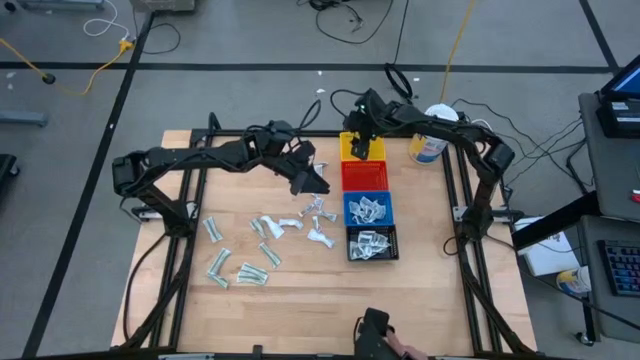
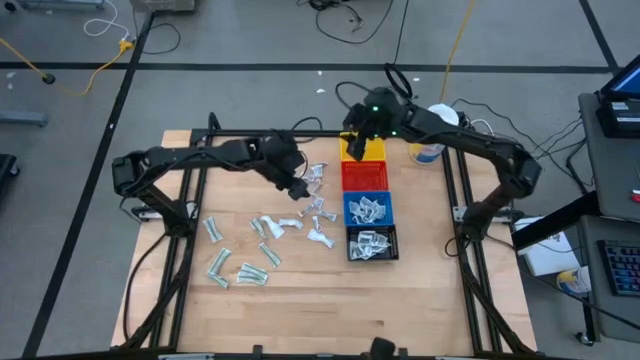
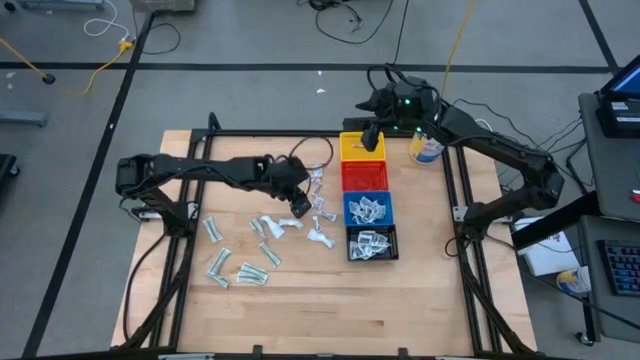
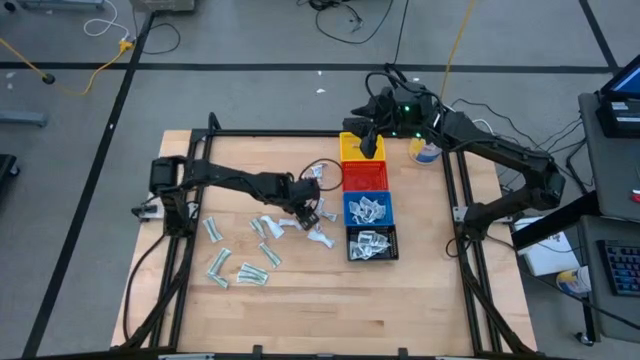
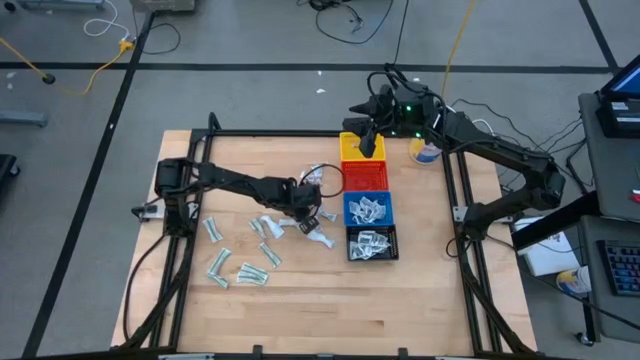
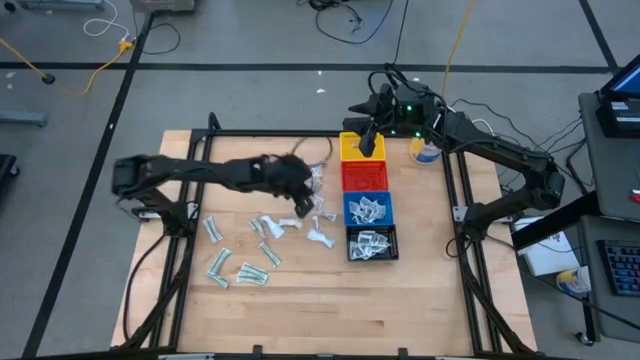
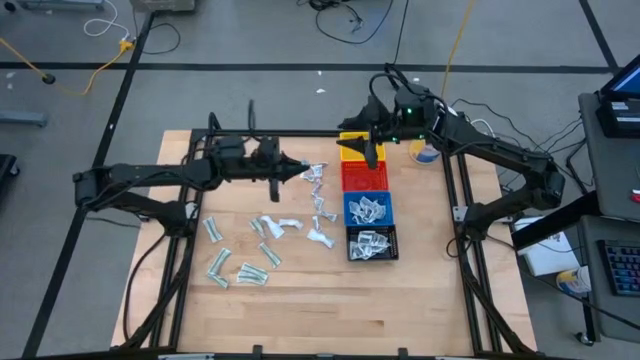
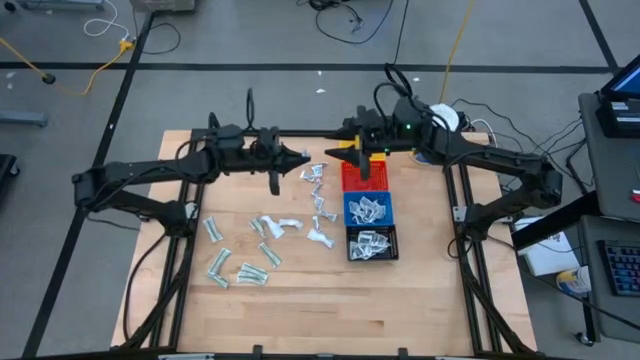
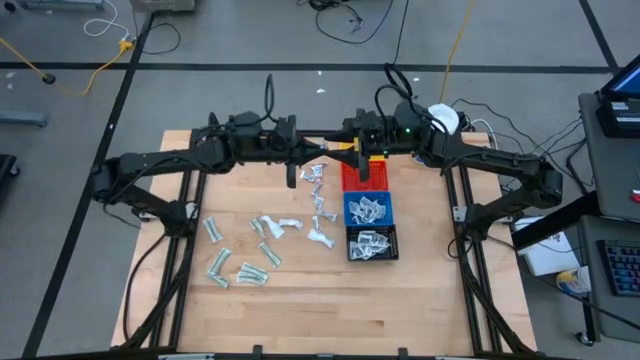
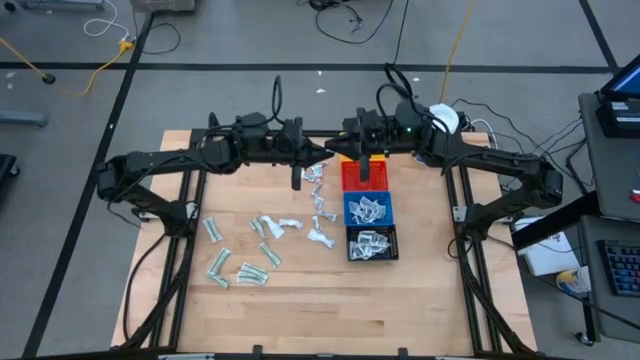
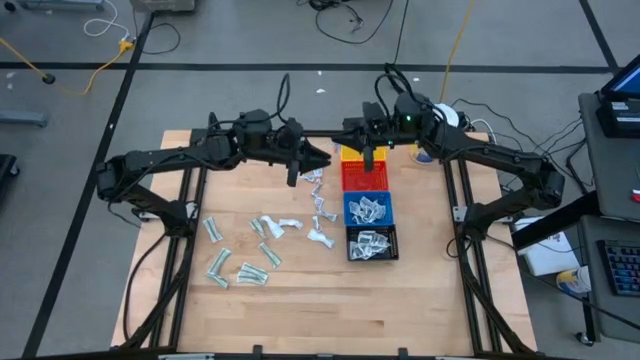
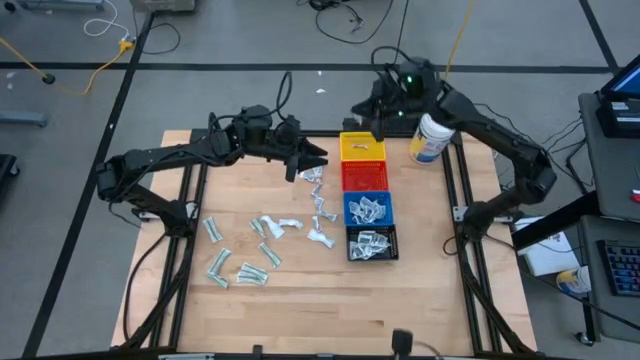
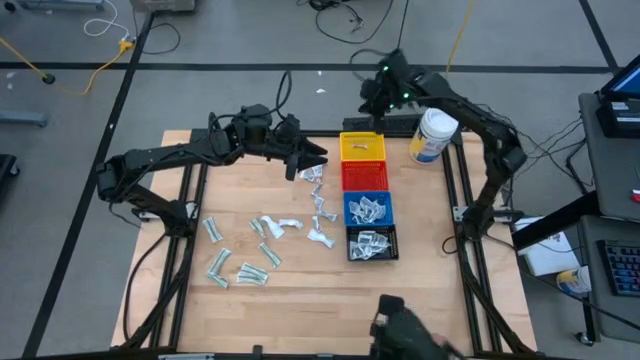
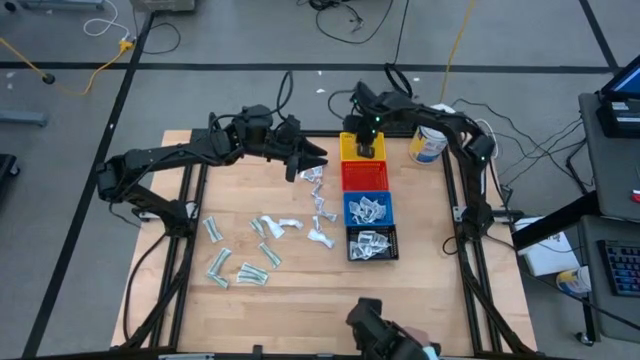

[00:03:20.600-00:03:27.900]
Task: Pick & Place First Aid Supplies
Put the orange ointment pack into the yellow bin

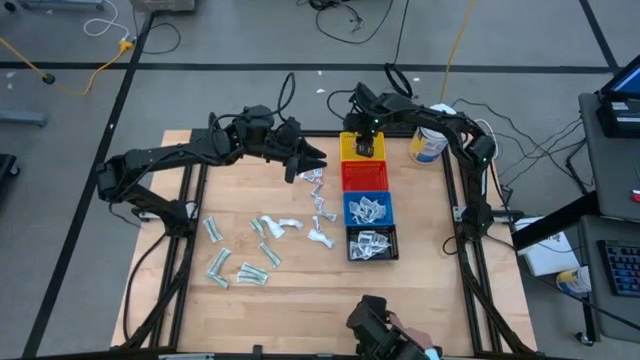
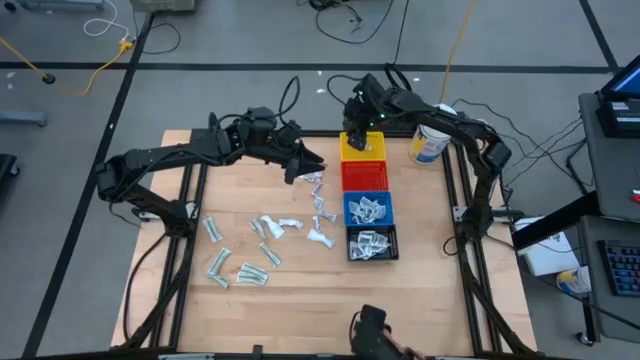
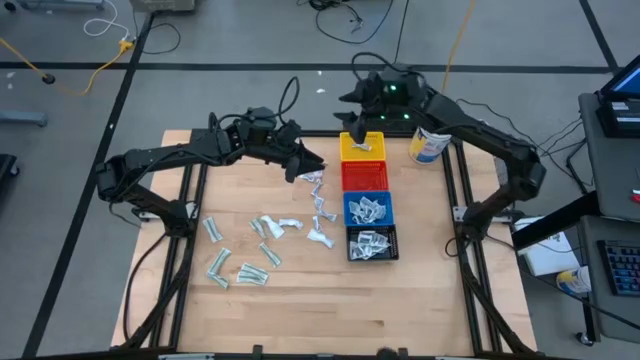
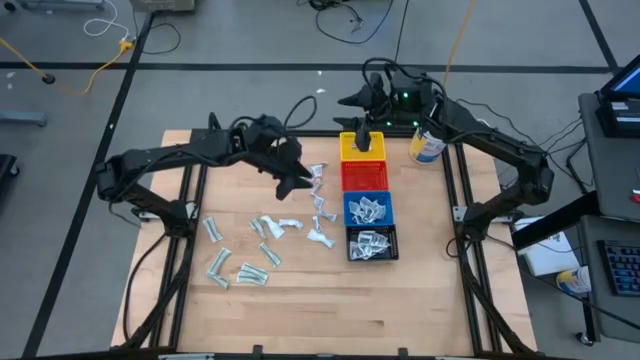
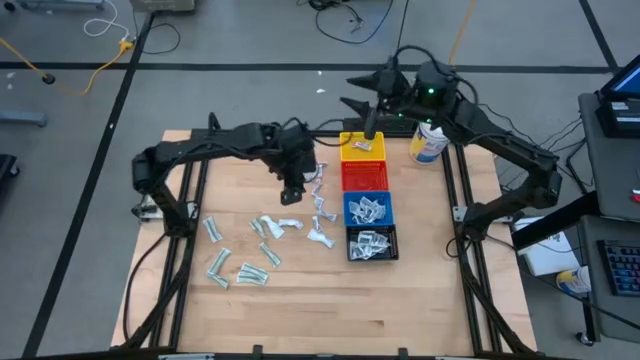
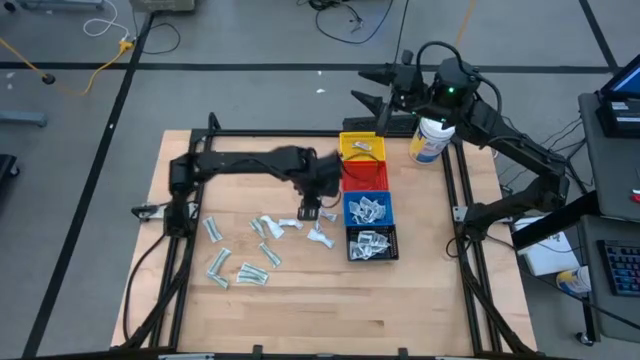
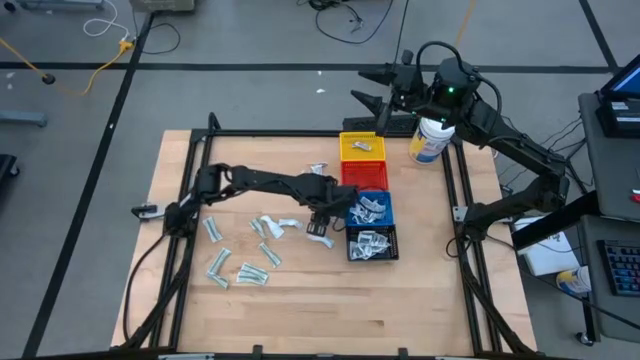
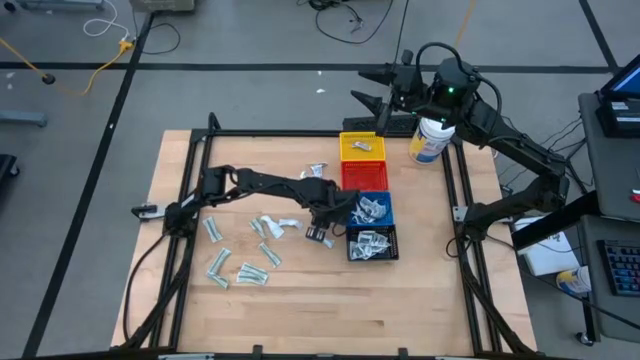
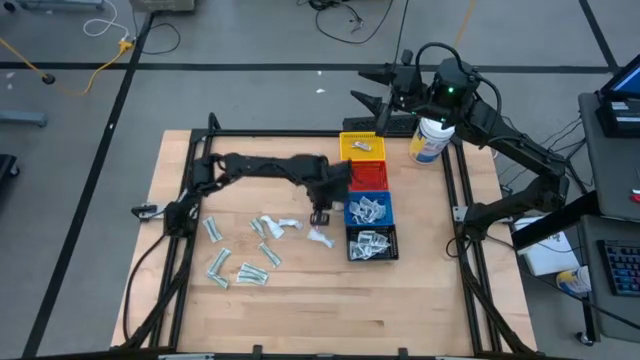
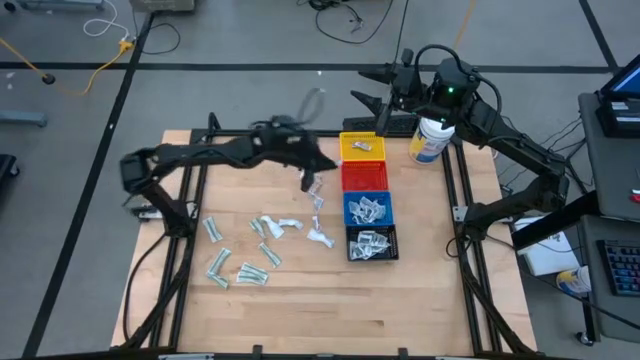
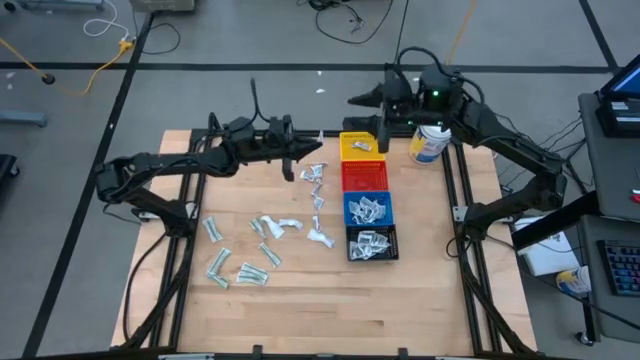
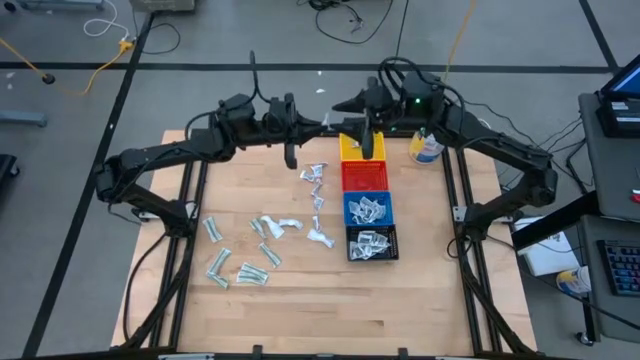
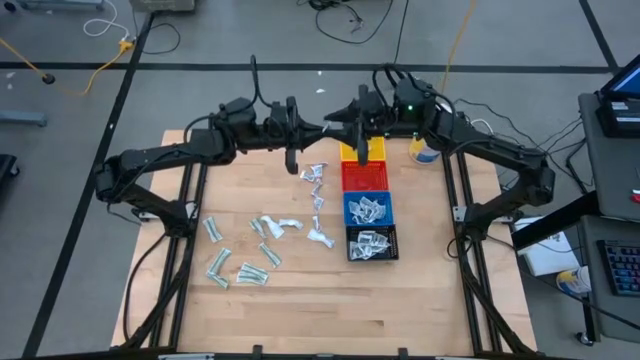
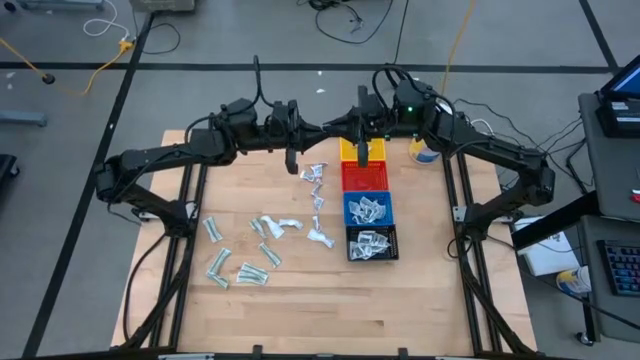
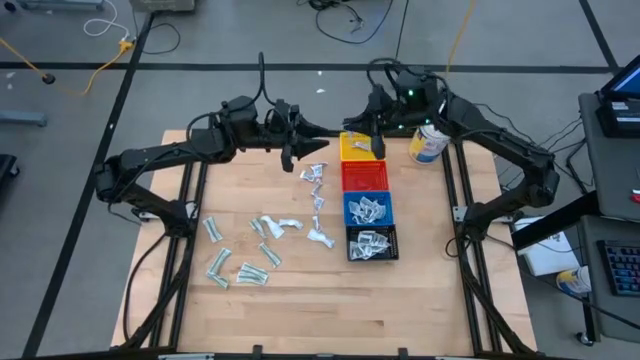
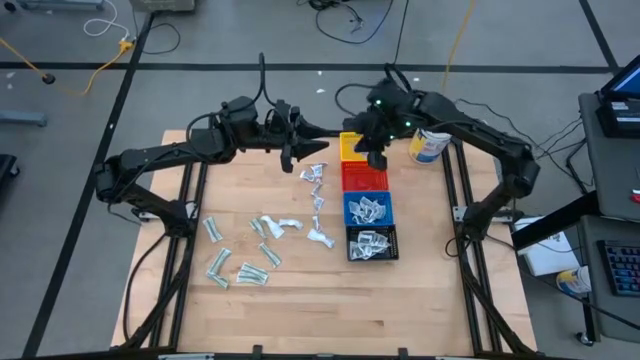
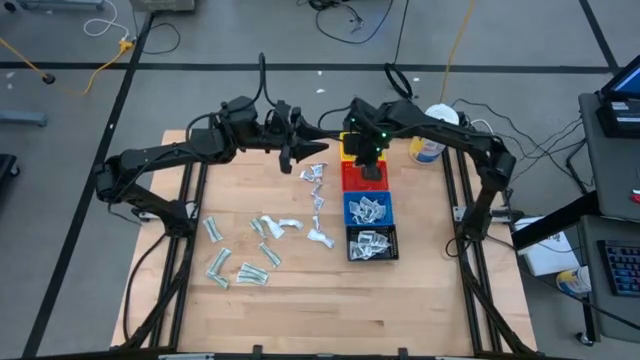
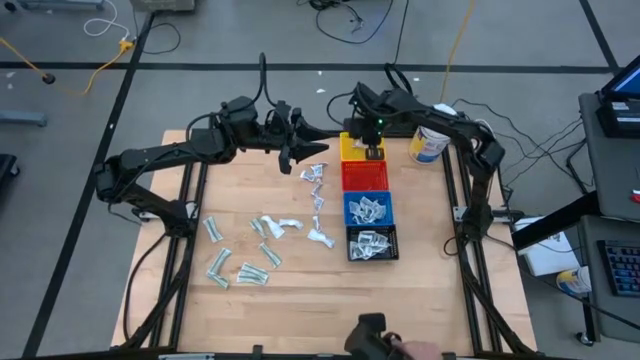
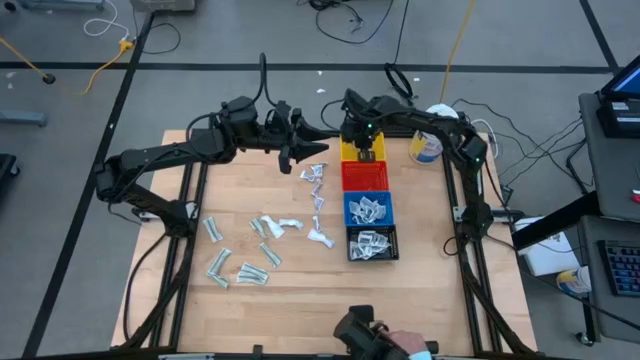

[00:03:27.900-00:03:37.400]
Put the orange ointment pack into the yellow bin

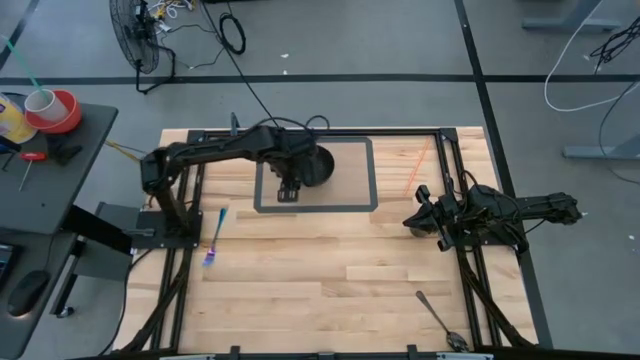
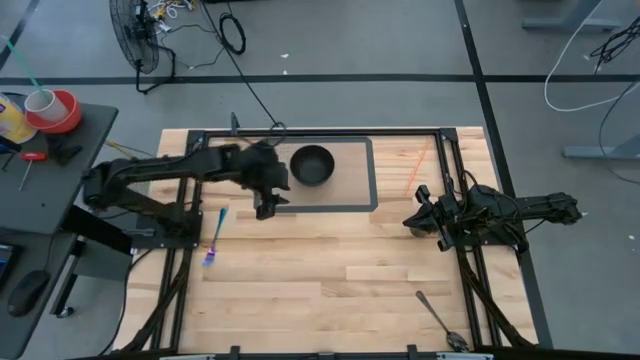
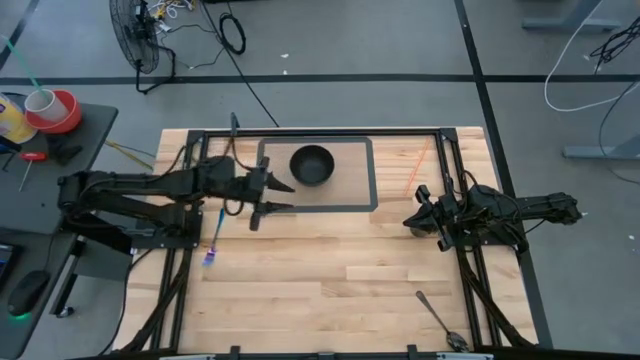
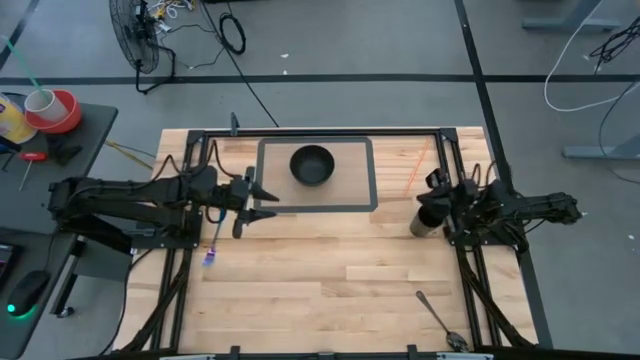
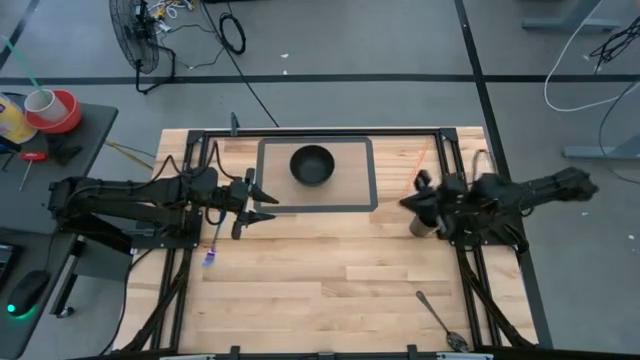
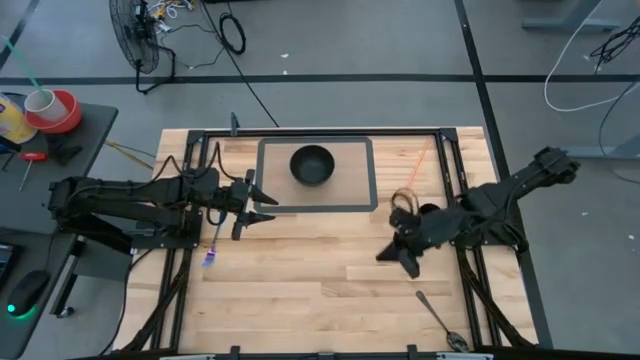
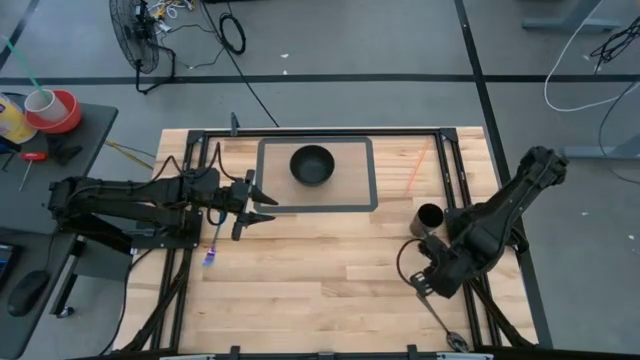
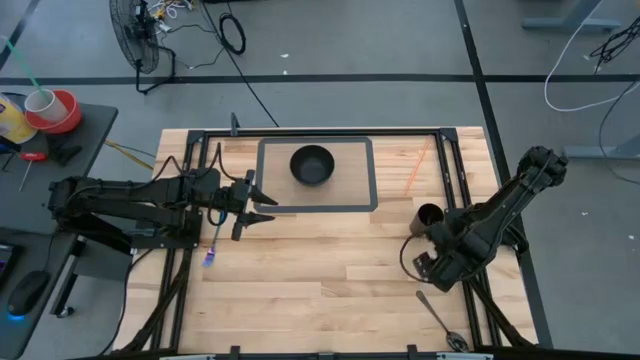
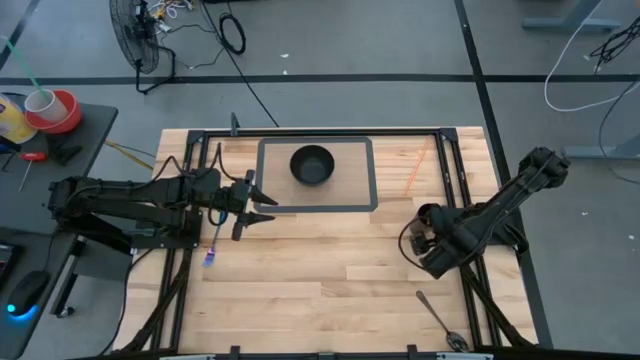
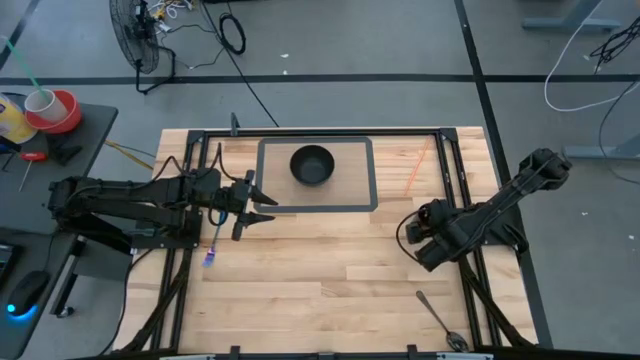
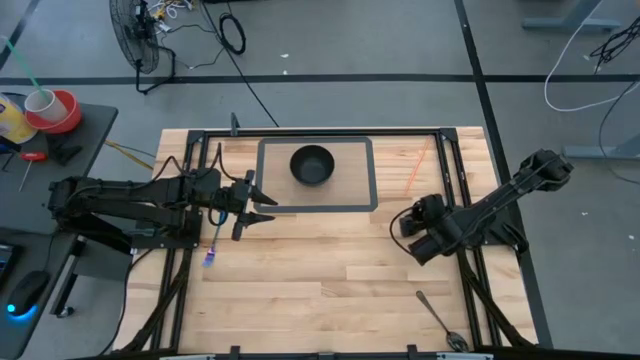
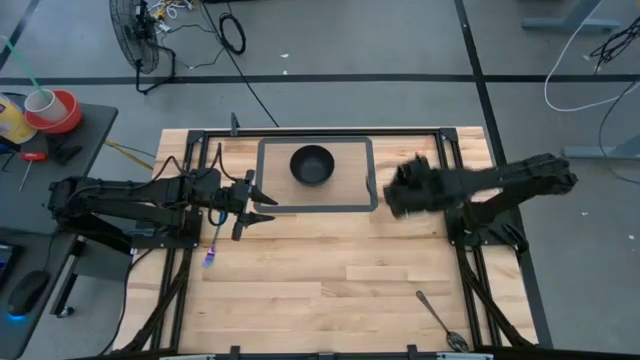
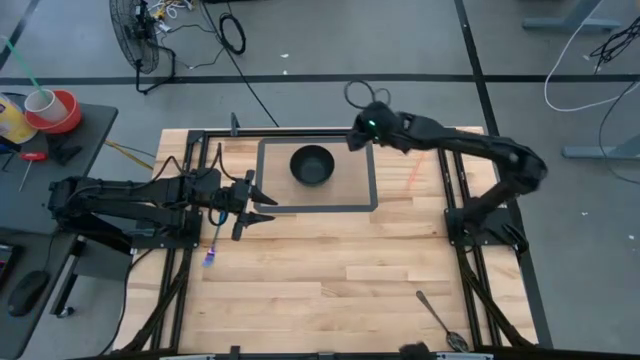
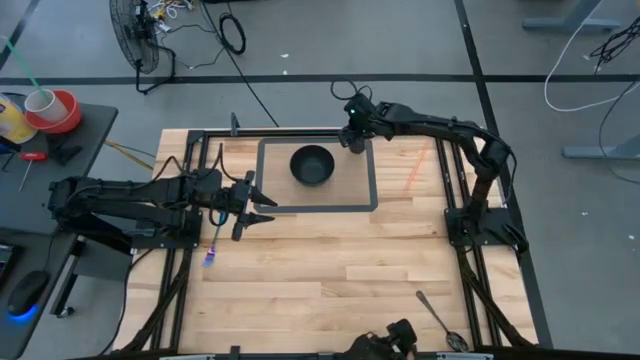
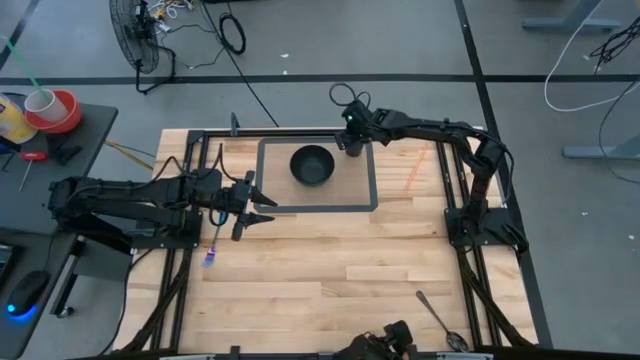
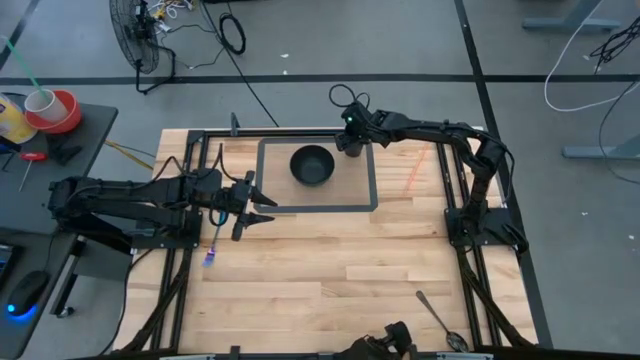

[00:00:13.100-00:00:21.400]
Task: Pick & Place Utensil
Put the black cup on the transparent mat to the top right of the black bowl
